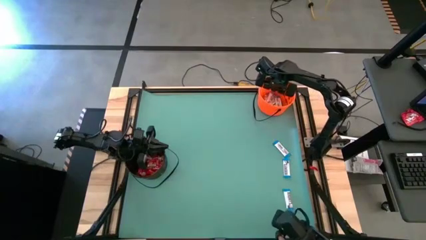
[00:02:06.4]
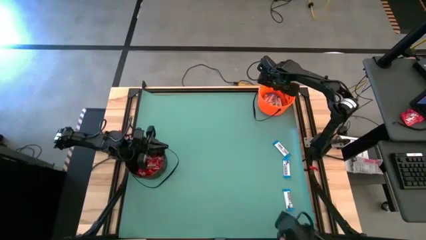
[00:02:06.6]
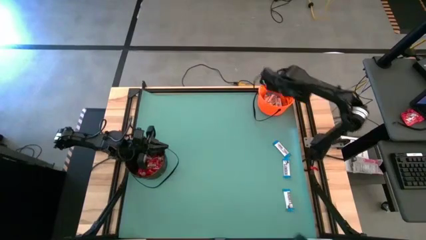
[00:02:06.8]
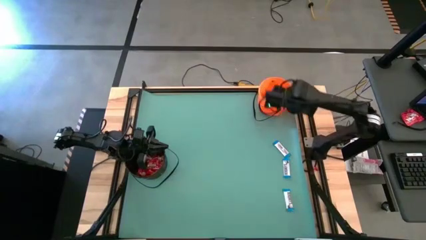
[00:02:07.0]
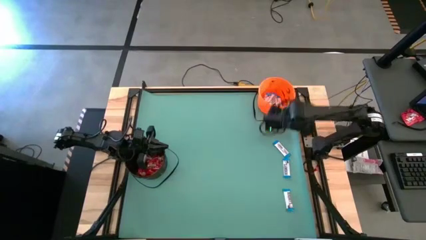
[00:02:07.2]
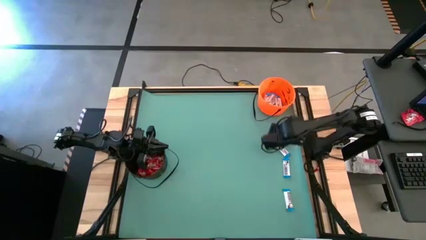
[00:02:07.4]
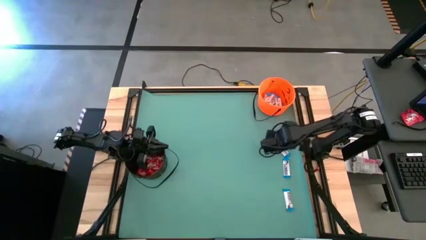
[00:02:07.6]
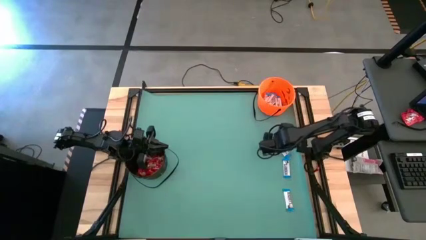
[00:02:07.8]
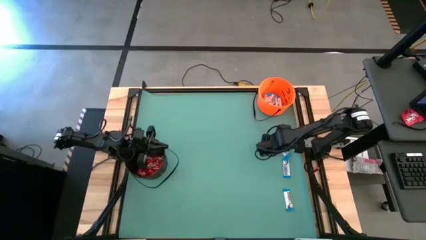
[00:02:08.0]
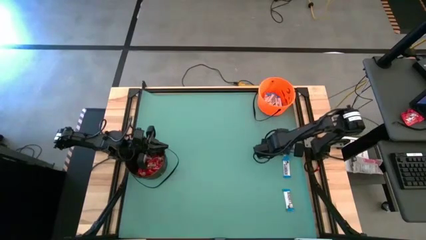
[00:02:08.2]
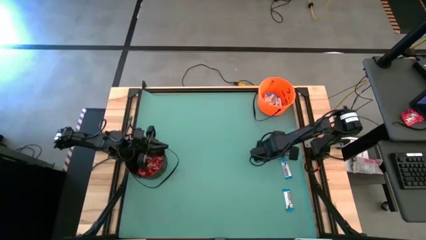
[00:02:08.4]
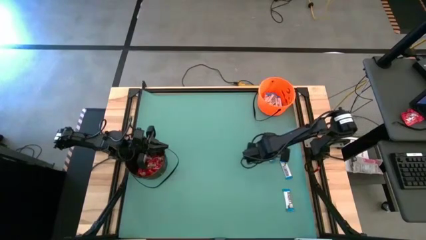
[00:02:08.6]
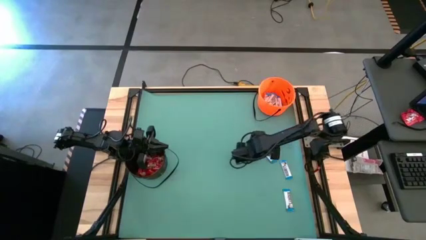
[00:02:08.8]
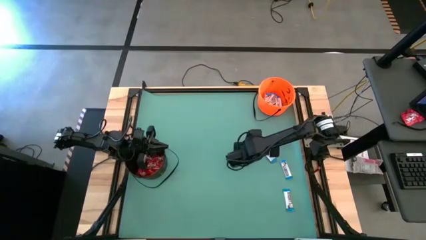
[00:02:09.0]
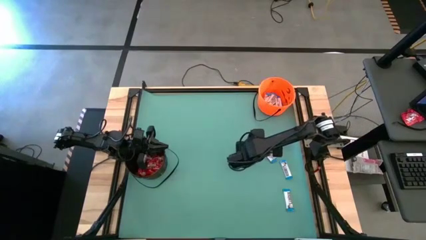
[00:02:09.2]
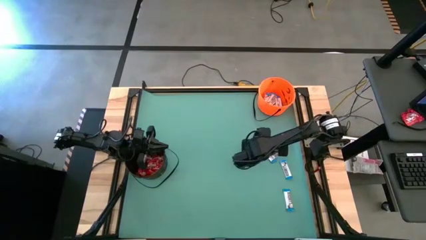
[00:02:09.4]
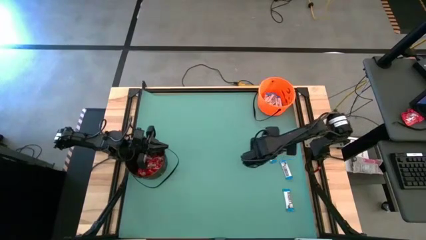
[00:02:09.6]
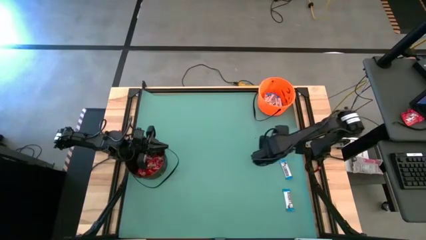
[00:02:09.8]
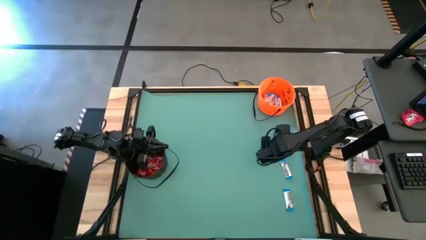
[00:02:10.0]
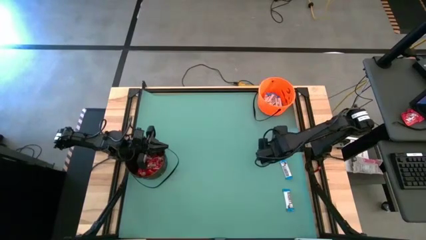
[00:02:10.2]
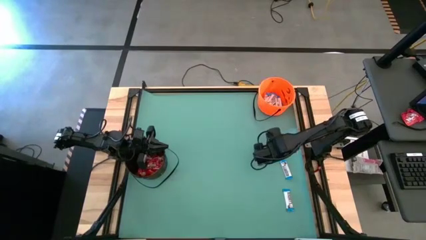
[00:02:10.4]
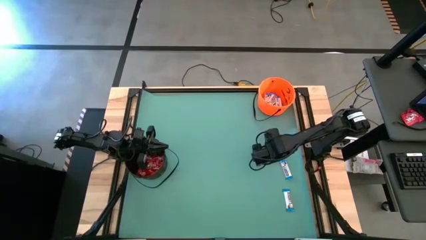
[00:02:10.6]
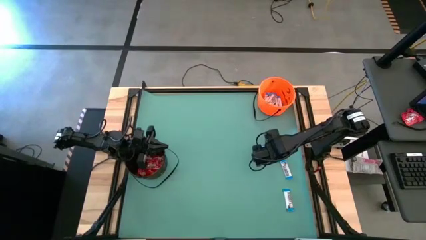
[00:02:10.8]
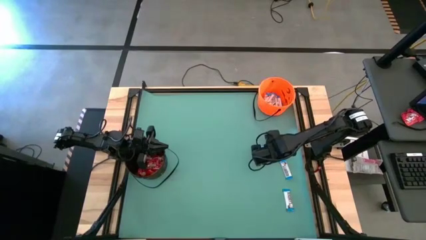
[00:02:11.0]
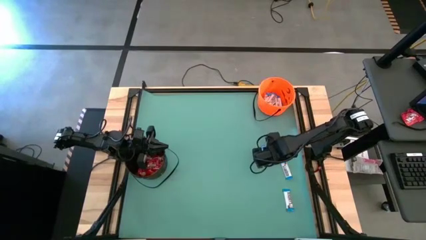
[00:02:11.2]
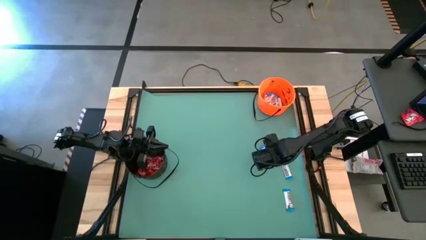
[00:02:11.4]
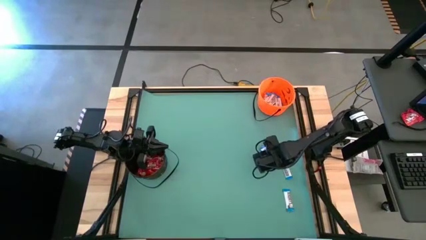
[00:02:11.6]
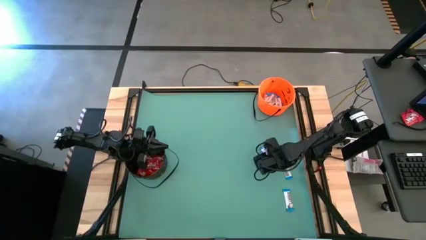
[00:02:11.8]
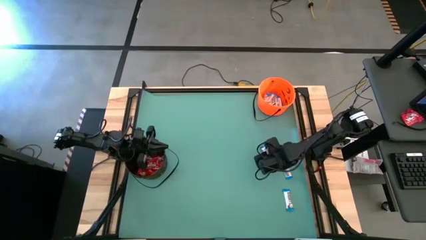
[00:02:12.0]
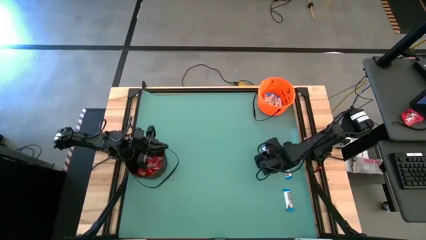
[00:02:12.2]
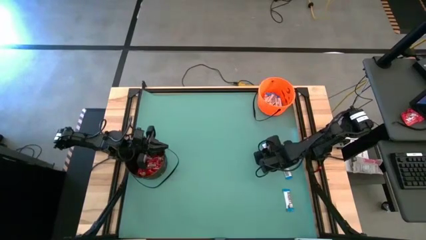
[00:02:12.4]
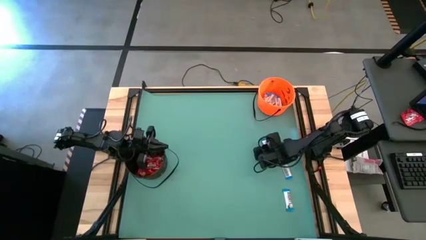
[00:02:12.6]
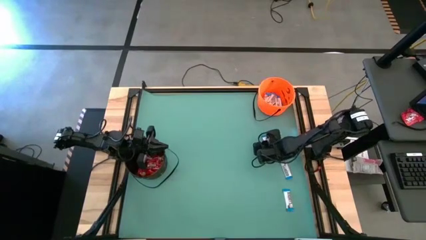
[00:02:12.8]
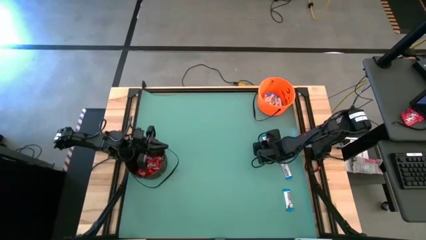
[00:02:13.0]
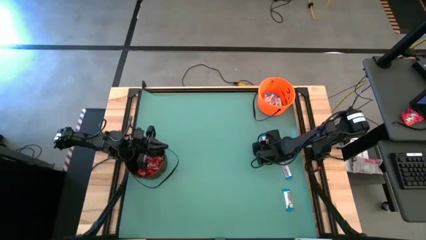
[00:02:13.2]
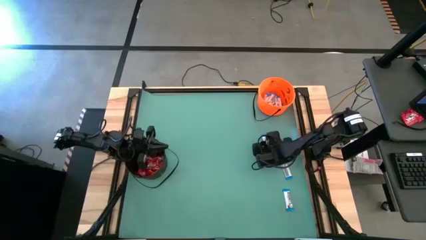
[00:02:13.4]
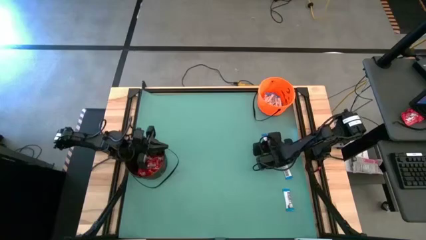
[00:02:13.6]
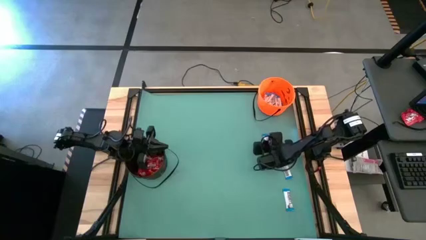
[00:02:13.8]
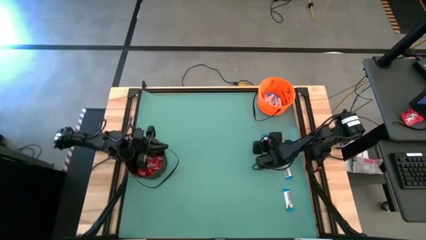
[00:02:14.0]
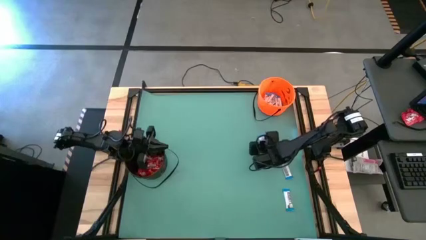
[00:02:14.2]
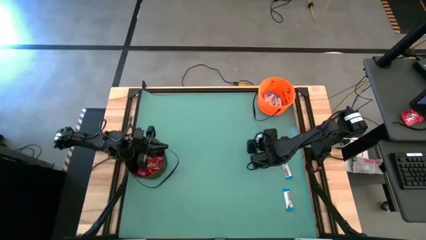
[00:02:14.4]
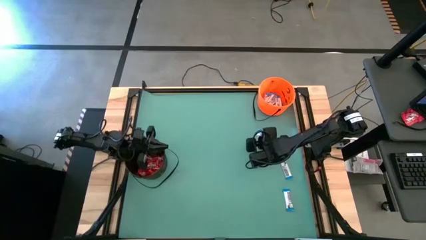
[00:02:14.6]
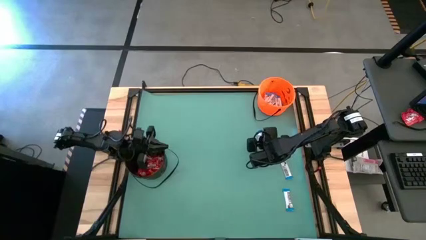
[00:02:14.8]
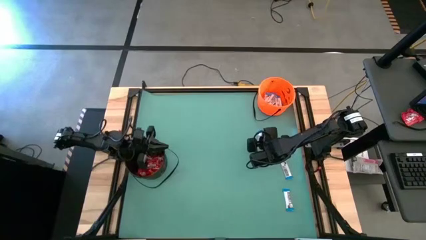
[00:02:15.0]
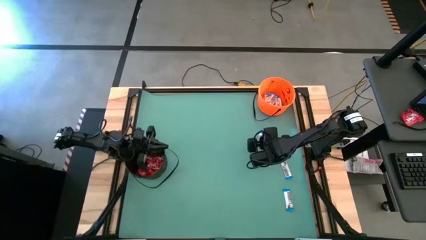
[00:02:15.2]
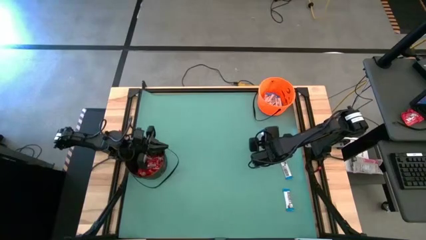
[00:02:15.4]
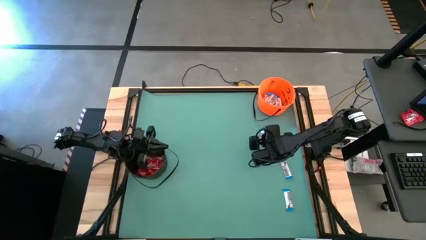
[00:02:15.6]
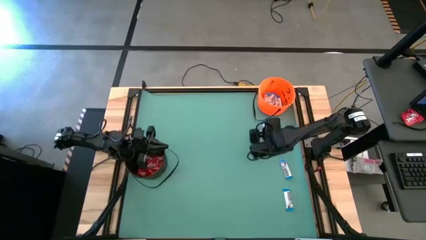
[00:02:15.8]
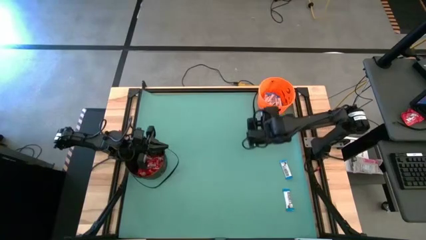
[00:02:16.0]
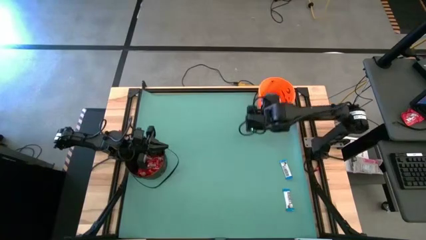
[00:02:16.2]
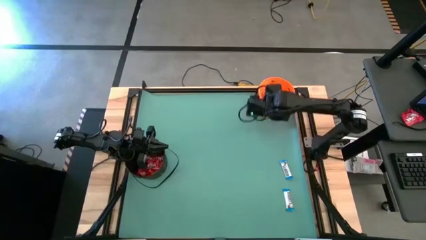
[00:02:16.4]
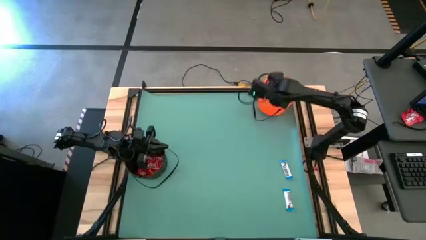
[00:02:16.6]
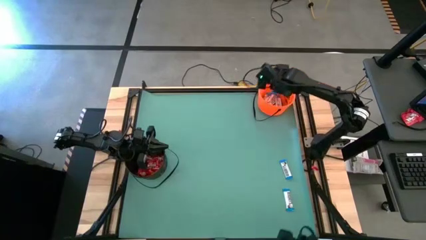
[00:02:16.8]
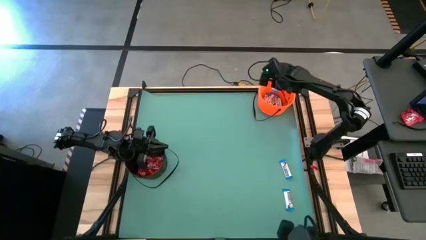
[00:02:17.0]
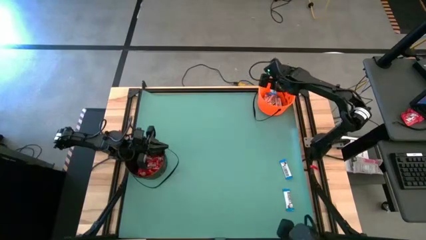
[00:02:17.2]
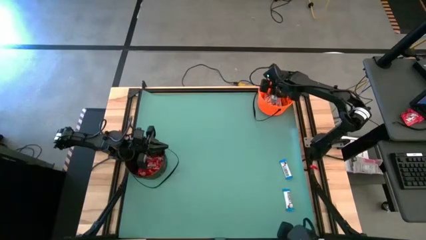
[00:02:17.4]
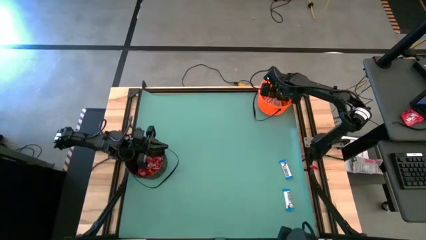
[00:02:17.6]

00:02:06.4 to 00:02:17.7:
Task: Sort candy by brand, put in halloween buckets
Put the white chocolate into the orange bucket

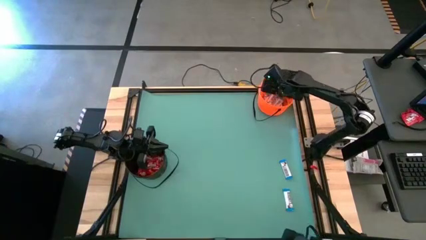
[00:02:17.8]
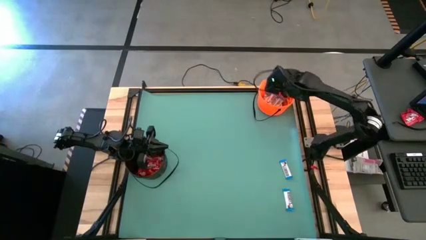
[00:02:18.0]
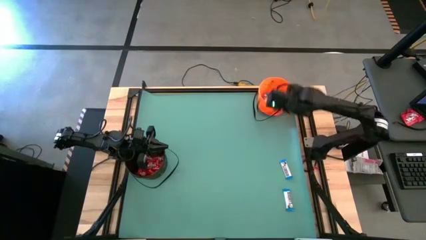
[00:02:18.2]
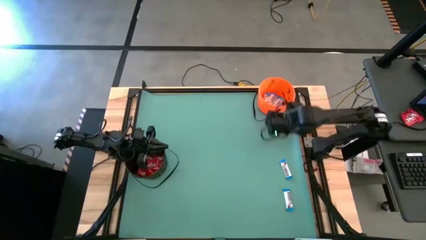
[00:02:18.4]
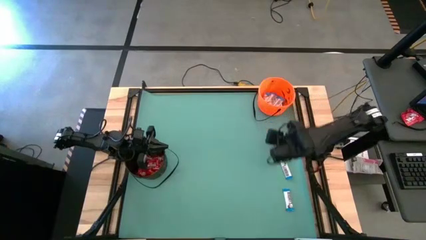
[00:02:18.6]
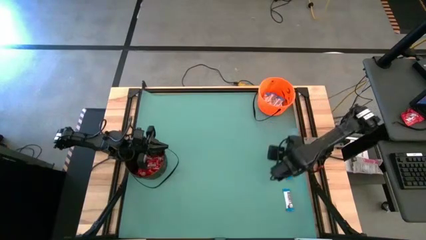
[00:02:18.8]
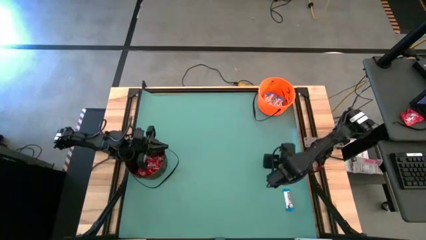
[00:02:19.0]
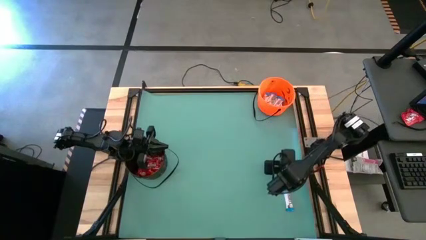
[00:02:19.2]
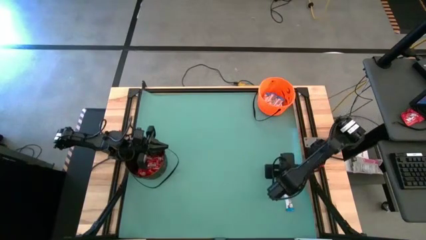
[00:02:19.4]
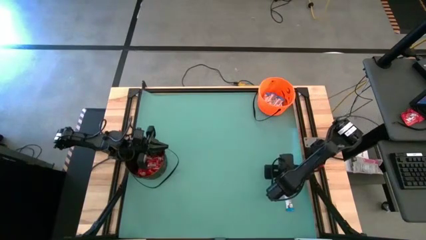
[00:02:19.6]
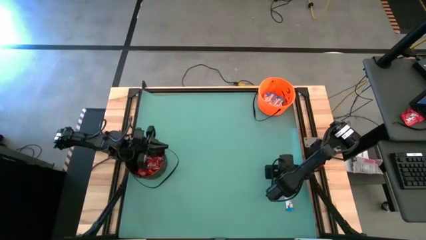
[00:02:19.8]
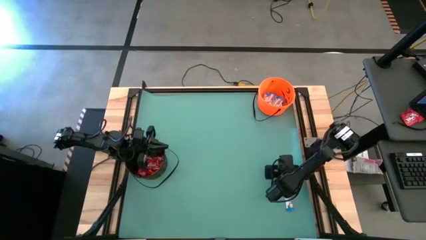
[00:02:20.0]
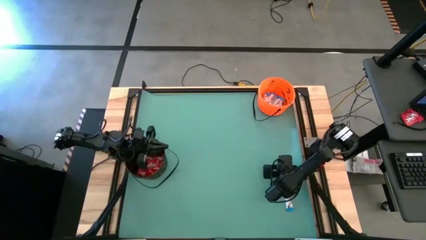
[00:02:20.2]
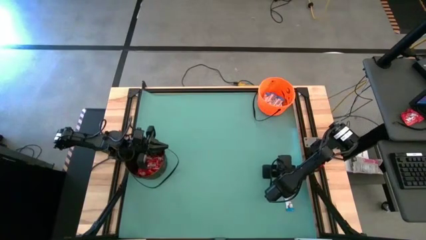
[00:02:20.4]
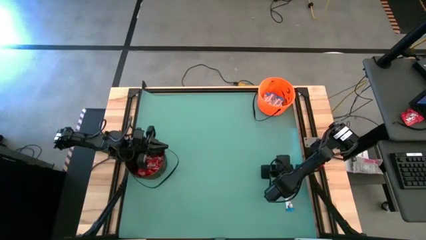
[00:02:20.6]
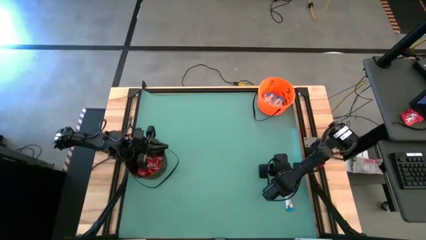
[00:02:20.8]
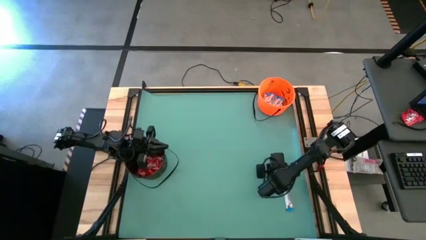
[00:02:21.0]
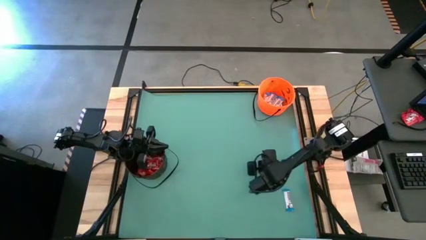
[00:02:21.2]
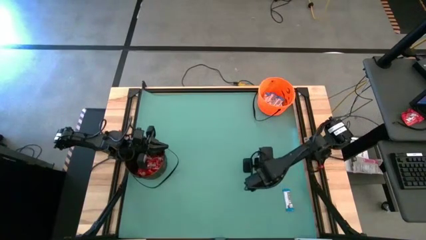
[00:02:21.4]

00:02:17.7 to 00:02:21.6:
Put the white chocolate into the orange bucket

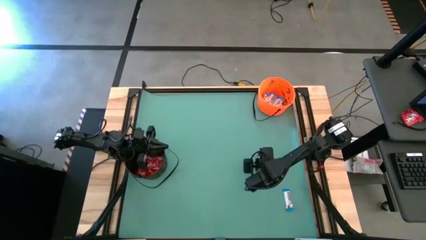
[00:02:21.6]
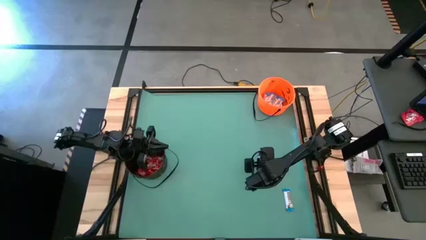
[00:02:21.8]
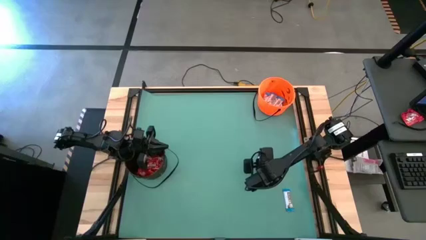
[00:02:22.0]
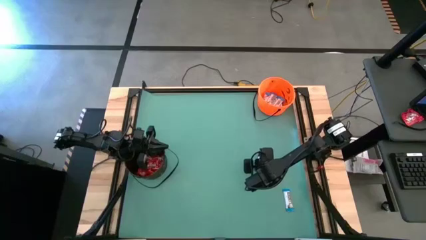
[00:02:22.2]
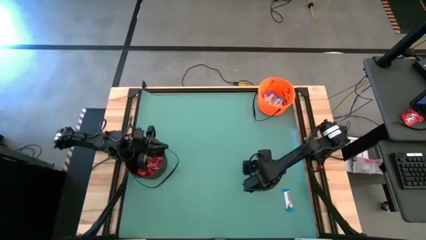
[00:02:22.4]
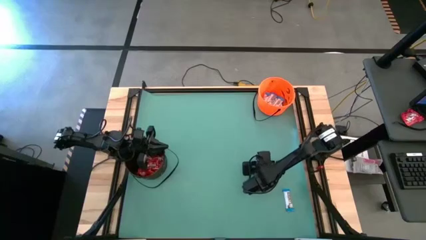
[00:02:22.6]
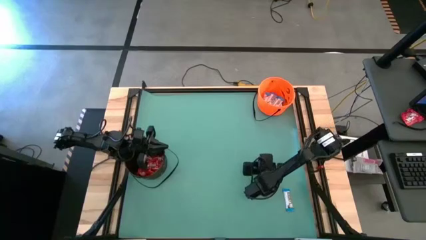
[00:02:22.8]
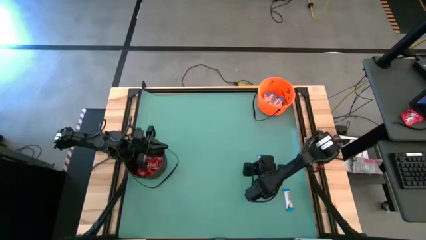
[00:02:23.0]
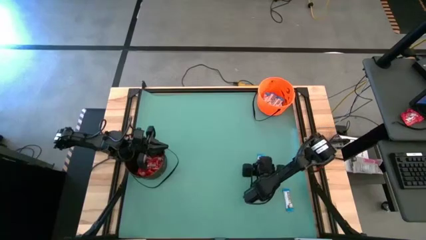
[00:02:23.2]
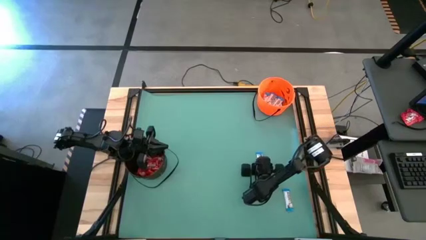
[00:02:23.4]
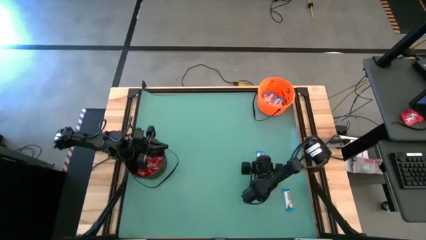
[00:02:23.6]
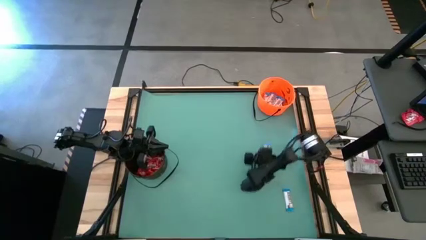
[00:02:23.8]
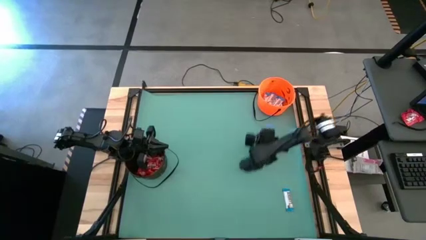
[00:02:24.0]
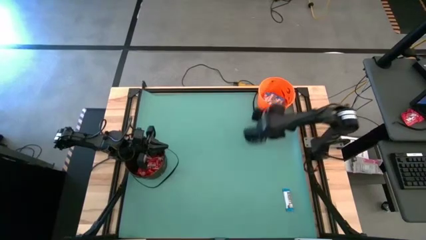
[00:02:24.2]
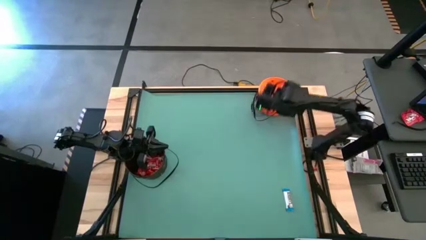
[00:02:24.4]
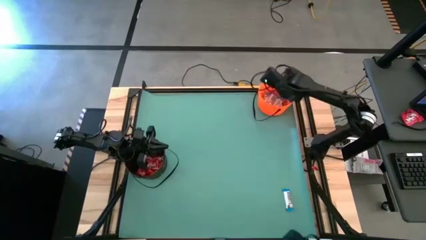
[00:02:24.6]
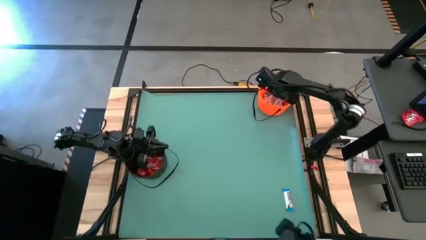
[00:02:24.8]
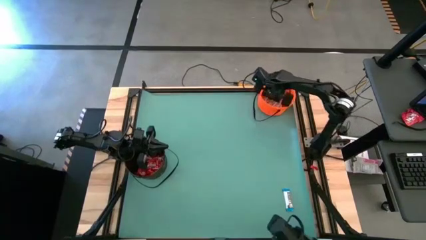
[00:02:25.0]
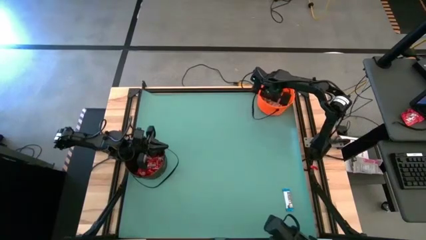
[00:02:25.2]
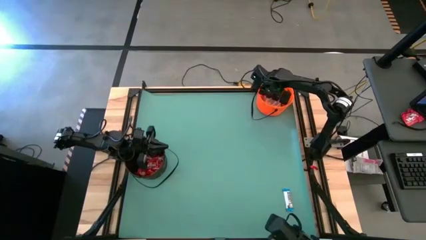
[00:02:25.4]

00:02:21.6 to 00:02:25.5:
Put the white chocolate into the orange bucket
